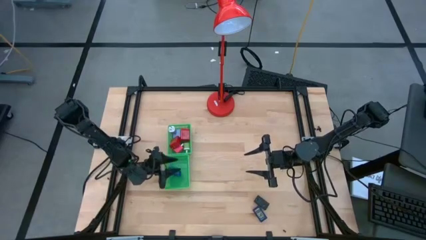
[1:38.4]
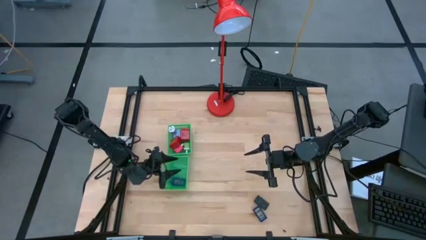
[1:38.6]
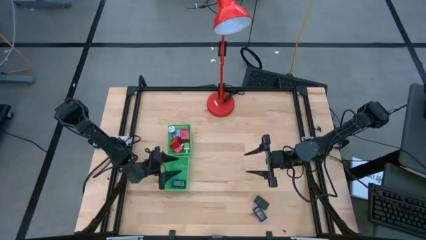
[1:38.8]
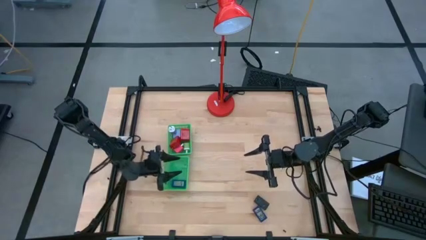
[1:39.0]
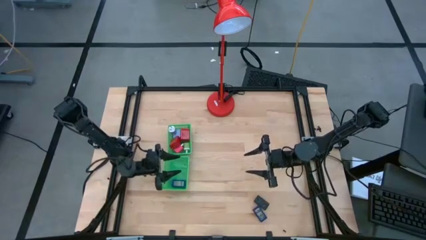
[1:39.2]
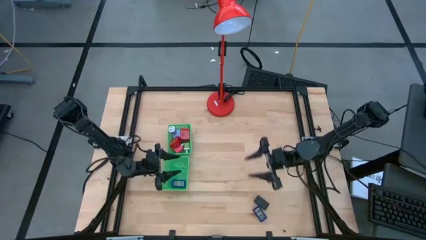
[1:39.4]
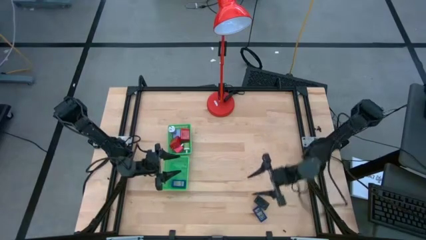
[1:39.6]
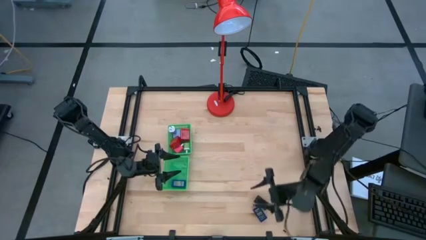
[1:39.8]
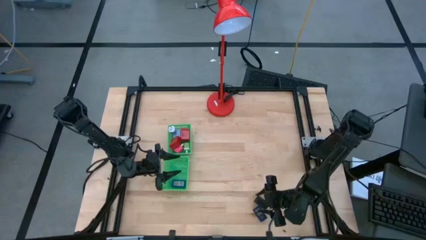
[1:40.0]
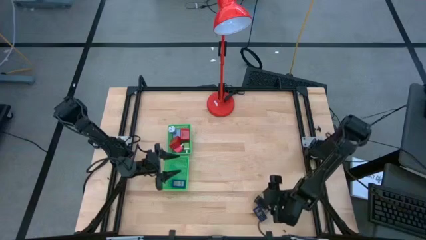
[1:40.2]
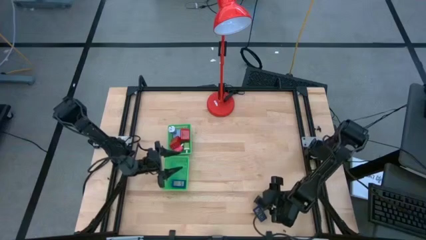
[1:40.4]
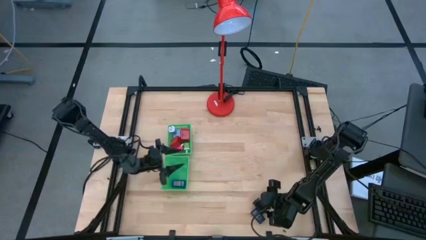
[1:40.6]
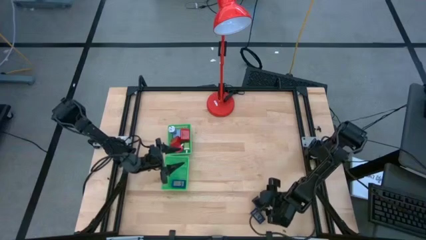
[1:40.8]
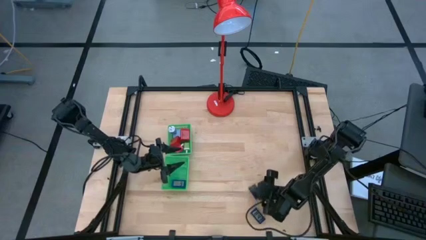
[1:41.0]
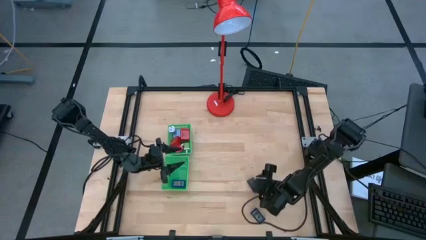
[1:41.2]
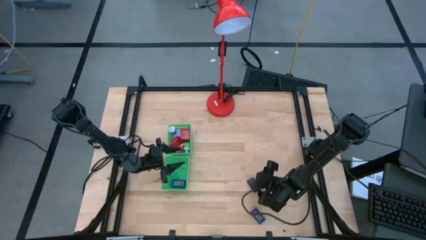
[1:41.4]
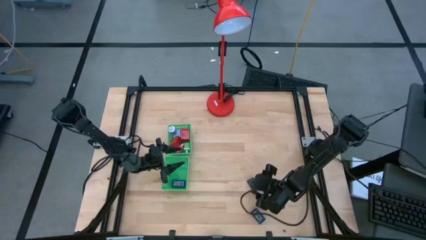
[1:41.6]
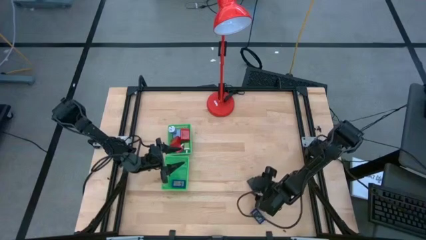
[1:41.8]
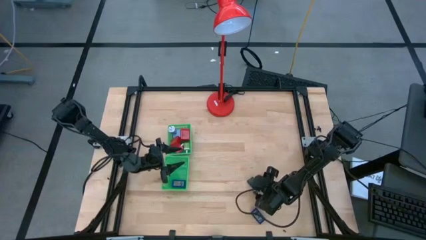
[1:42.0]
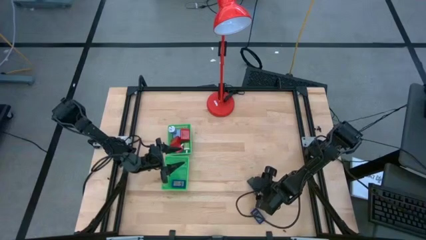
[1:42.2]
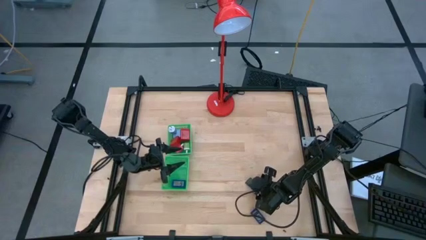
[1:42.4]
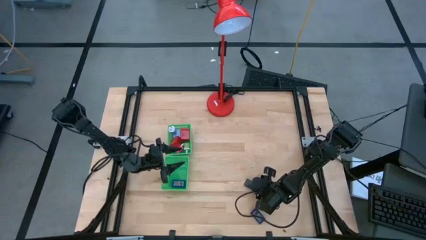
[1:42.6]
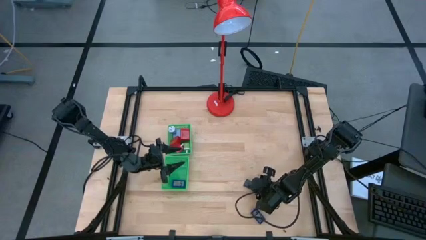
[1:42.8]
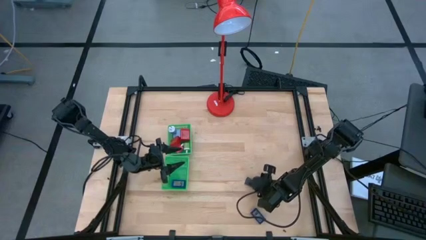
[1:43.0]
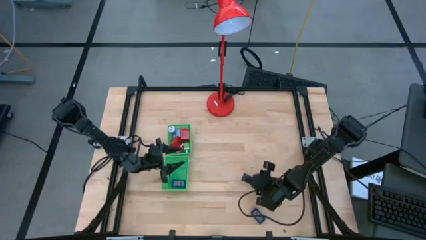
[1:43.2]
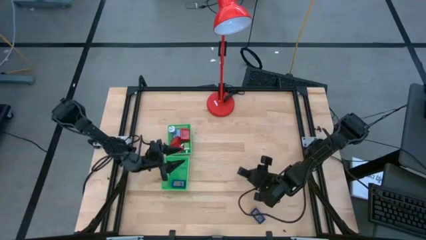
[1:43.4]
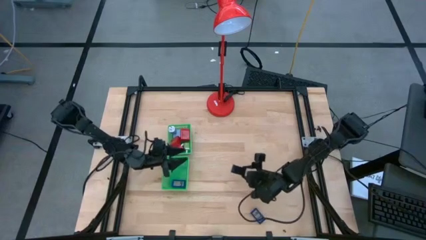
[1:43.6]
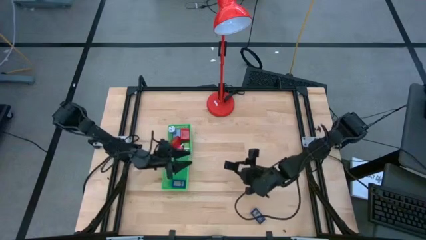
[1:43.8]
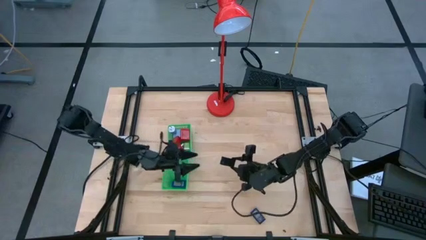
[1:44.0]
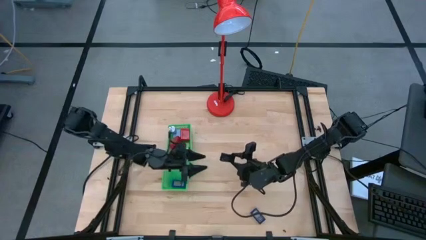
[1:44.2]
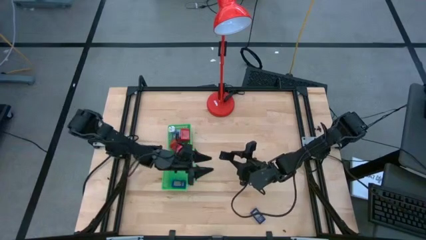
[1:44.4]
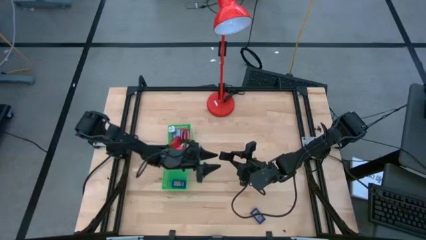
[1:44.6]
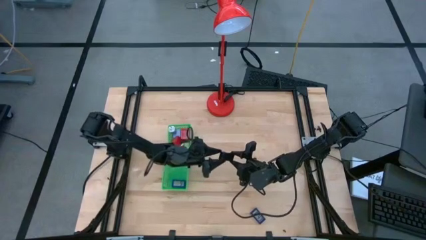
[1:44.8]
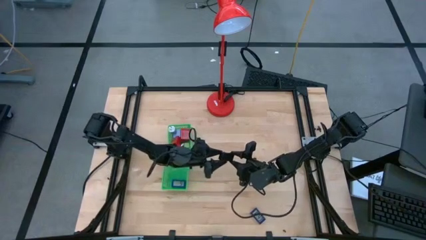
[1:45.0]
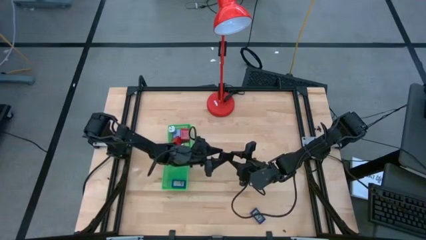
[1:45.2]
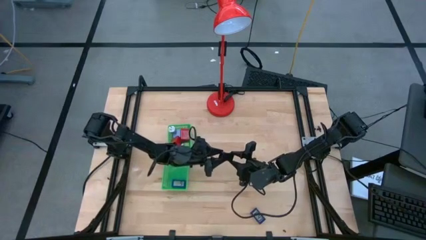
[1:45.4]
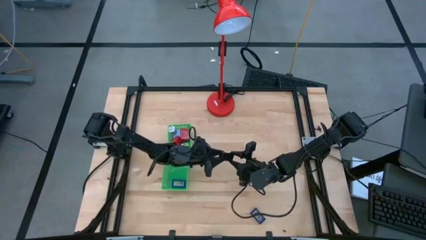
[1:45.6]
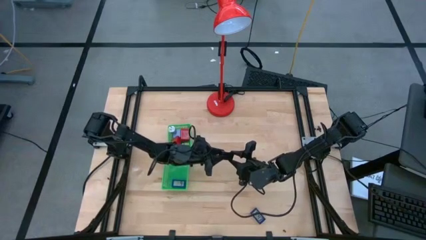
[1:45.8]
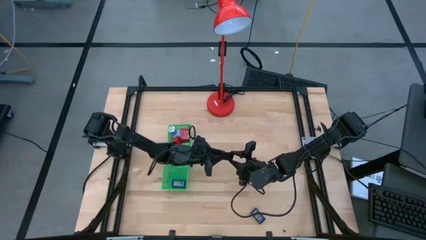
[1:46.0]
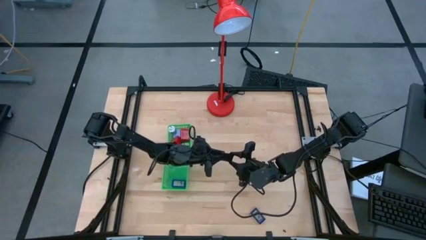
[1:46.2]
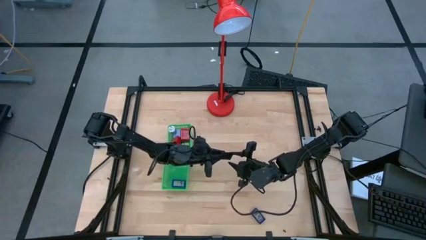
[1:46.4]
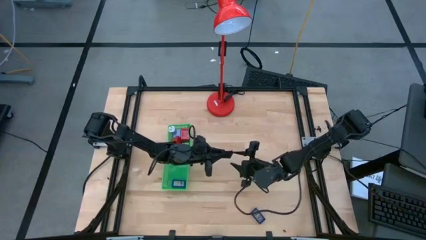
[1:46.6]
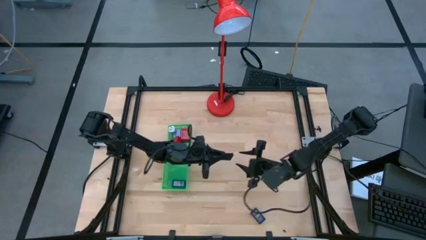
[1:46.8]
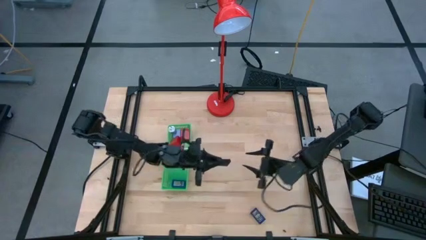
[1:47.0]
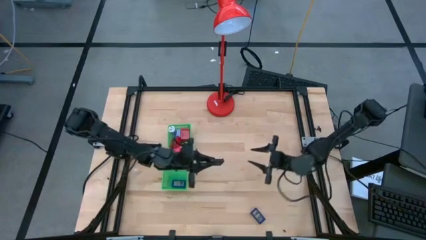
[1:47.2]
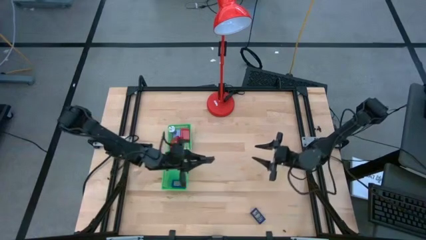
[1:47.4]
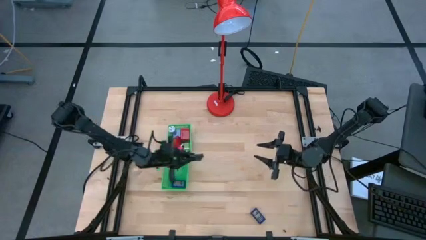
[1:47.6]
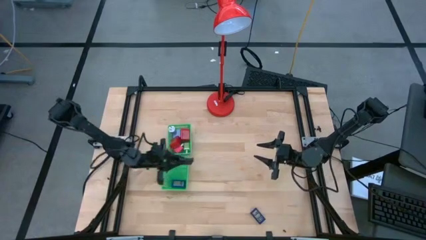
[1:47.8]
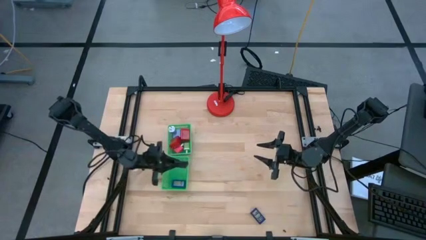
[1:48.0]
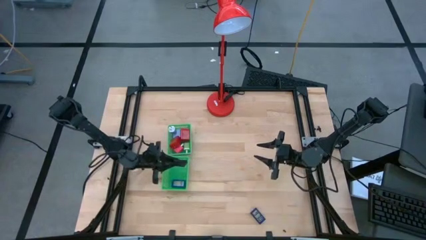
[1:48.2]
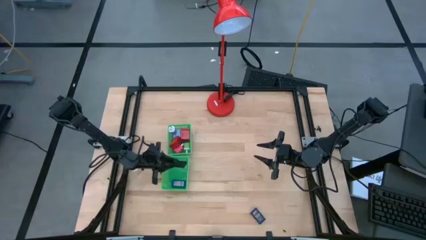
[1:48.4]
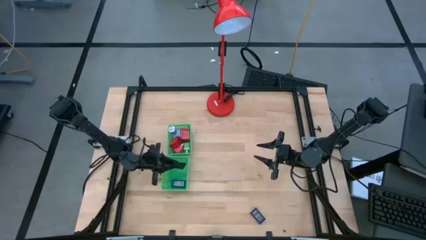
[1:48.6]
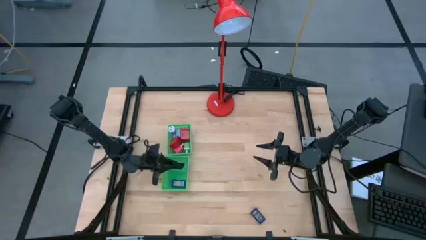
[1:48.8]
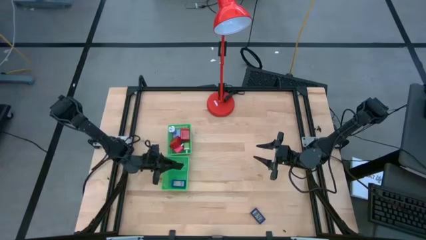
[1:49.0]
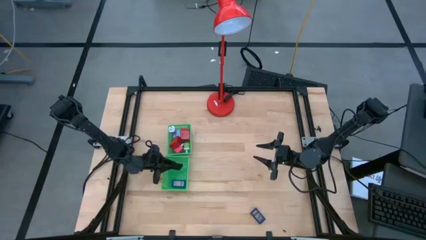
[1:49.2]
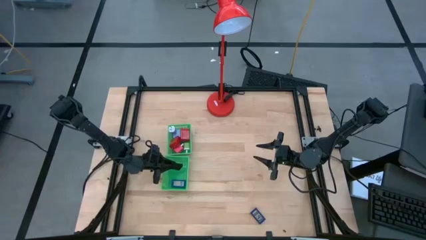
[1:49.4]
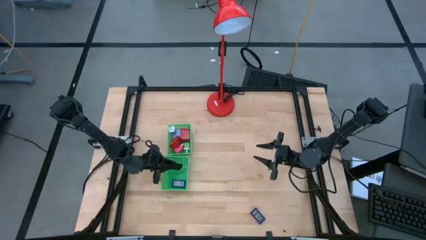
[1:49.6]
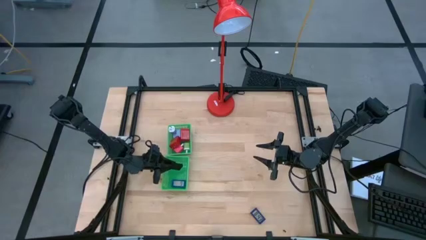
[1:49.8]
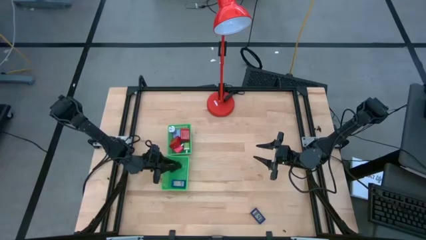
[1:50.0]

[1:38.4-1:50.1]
Task: Pick & Place Office items
Put the black digital timer into the bottom green bin

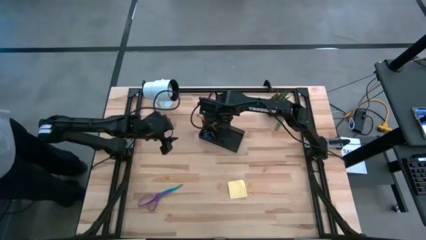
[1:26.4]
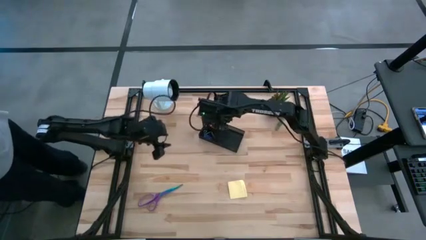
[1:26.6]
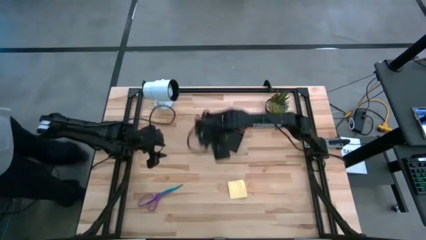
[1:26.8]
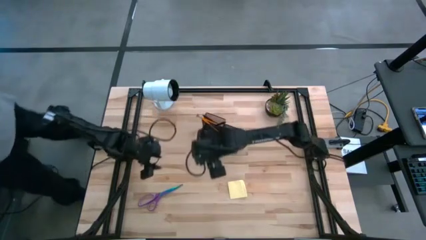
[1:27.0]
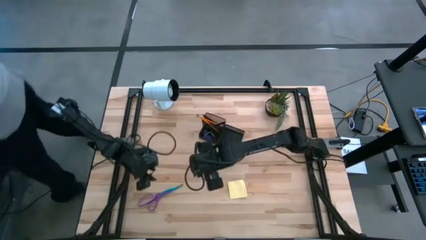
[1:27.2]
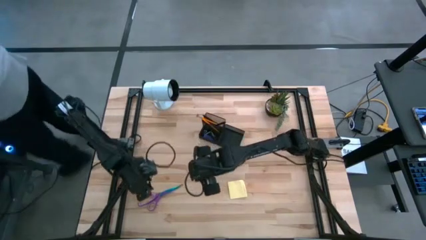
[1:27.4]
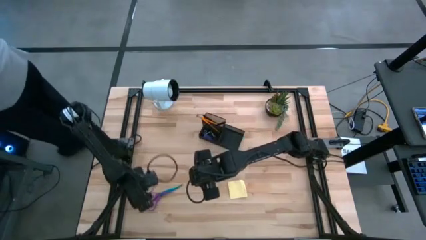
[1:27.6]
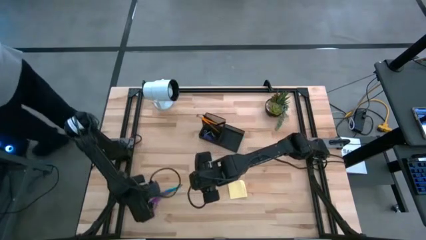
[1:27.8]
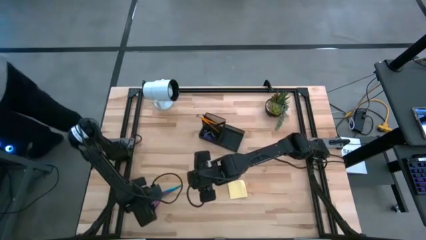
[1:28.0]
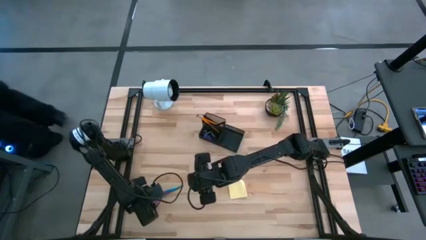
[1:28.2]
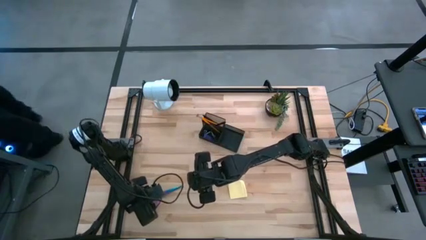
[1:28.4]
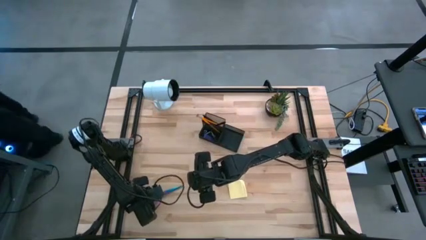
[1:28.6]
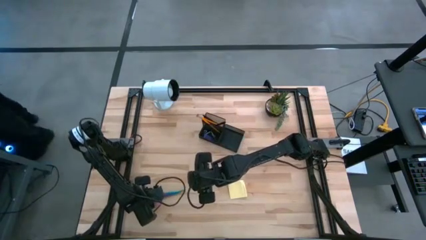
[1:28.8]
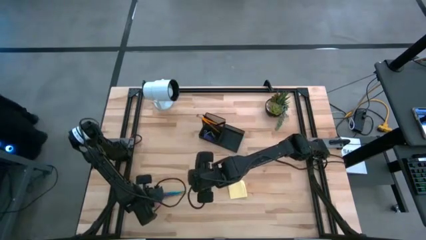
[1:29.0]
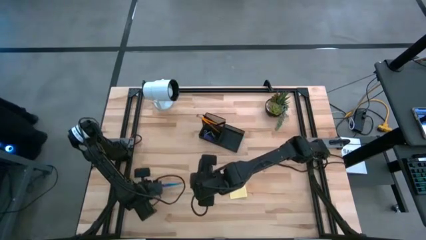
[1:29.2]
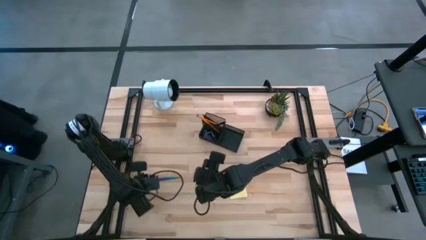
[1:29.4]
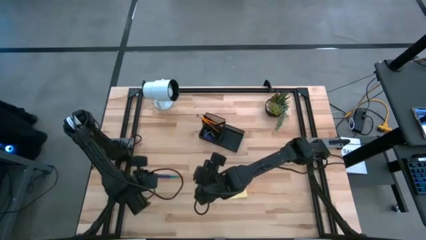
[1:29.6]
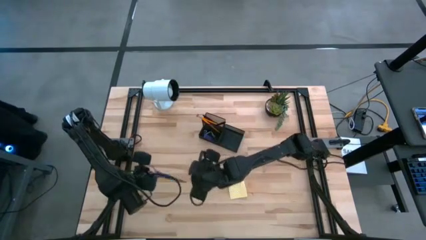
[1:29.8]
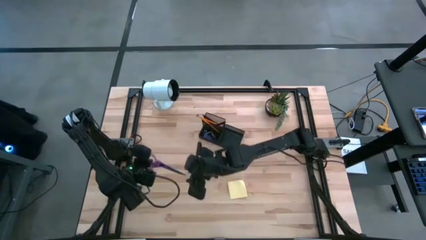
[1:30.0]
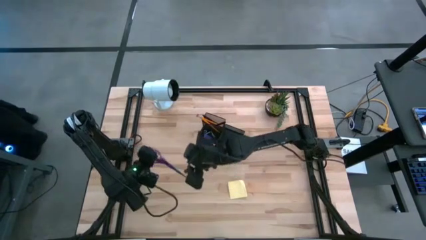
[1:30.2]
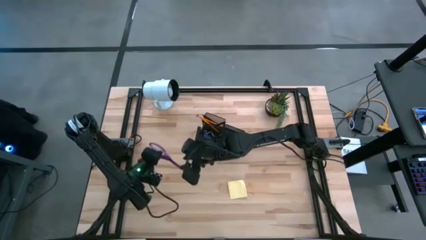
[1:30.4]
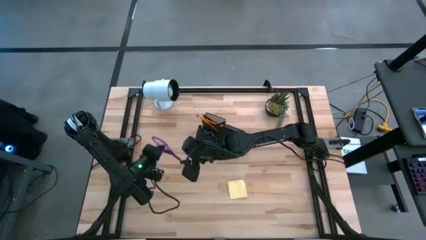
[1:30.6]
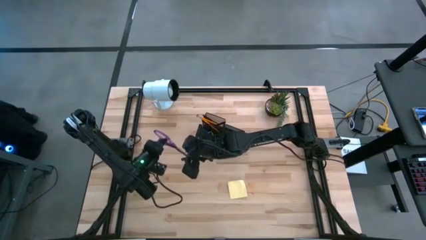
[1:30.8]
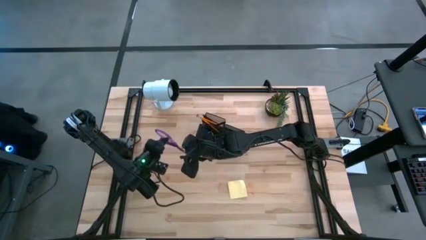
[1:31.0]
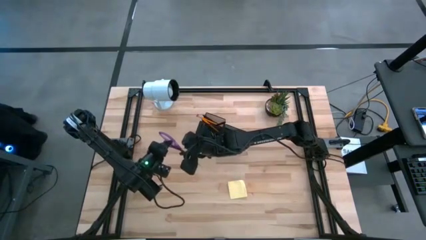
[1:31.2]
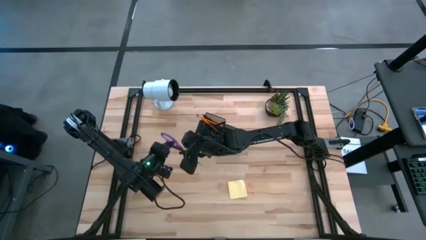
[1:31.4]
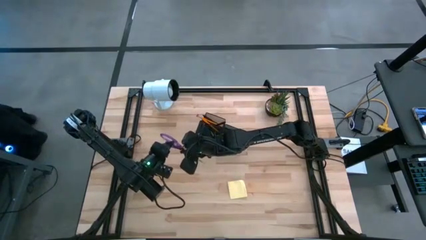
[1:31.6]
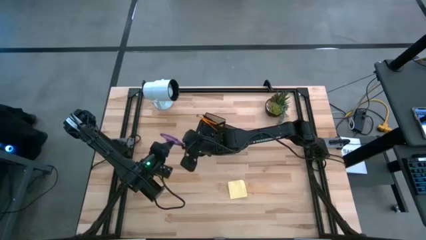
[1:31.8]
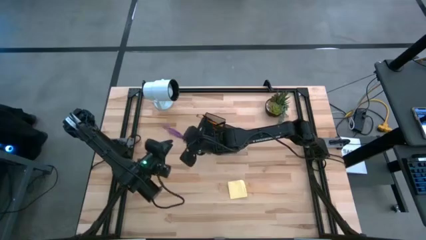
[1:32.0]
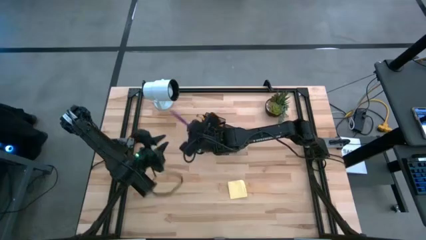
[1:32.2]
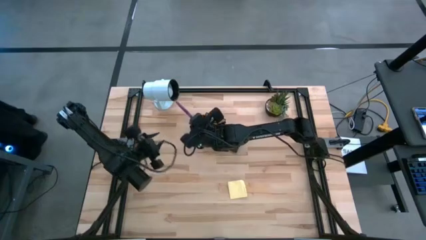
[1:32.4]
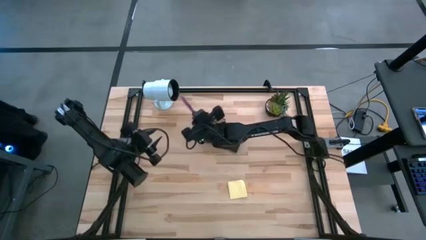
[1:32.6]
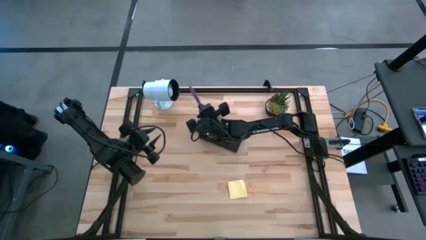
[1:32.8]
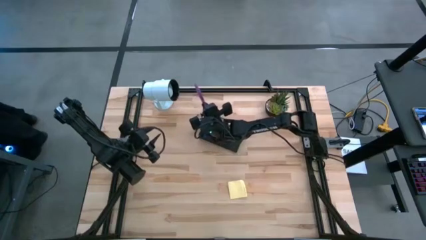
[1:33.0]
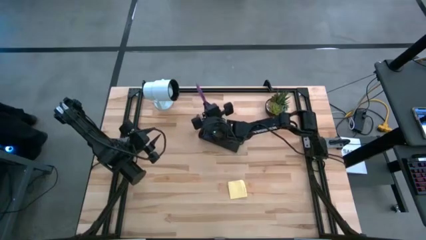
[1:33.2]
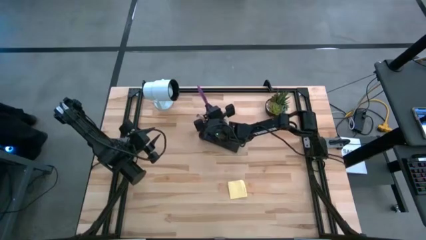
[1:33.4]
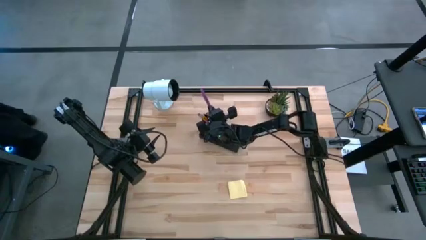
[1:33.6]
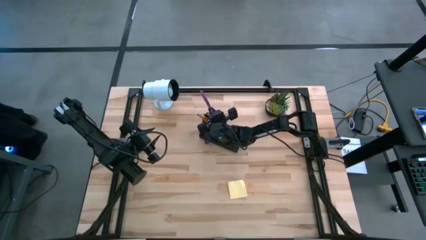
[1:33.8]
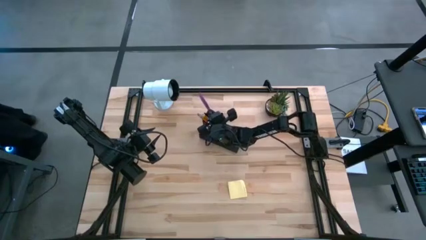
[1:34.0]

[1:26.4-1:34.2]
Task: Pick and place office supplies into organizer
Put the purple scissors into the black desk organizer
